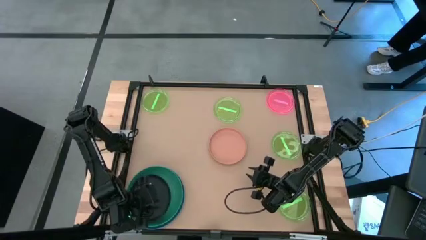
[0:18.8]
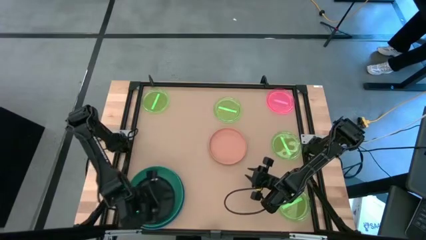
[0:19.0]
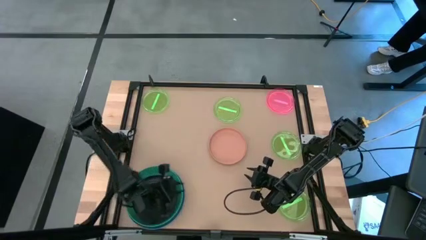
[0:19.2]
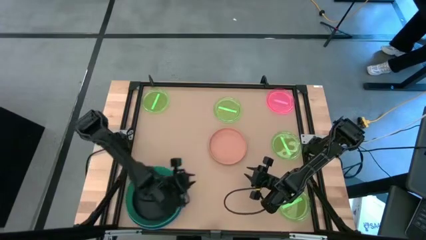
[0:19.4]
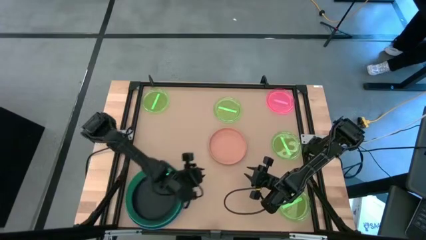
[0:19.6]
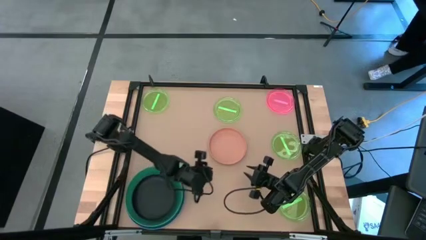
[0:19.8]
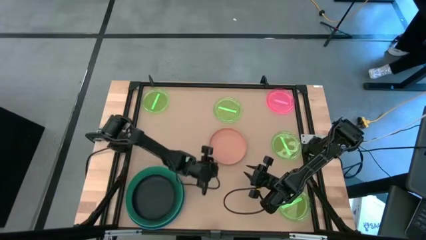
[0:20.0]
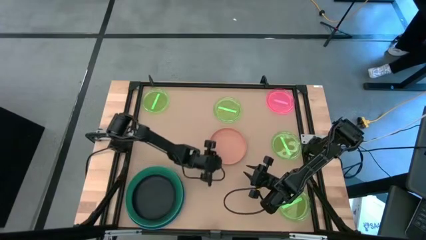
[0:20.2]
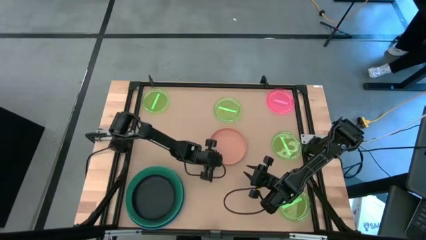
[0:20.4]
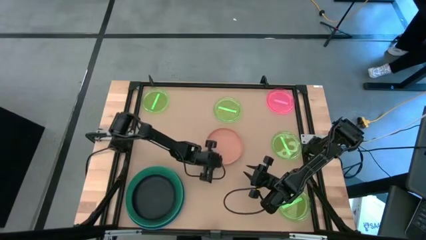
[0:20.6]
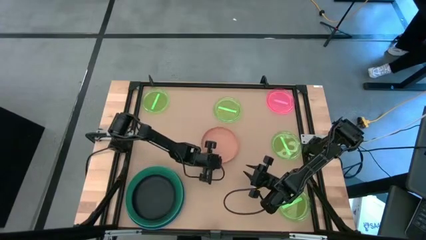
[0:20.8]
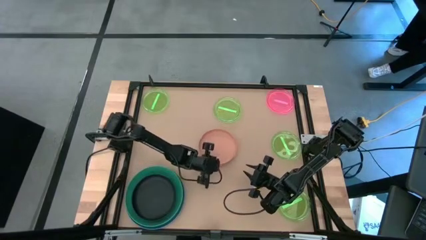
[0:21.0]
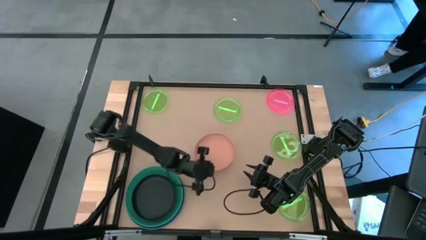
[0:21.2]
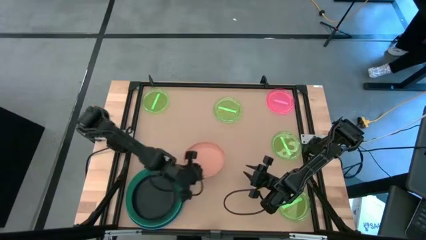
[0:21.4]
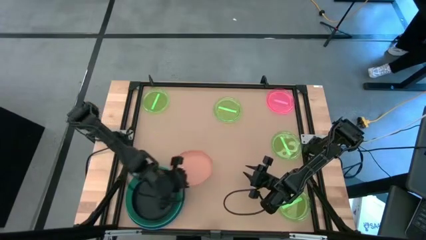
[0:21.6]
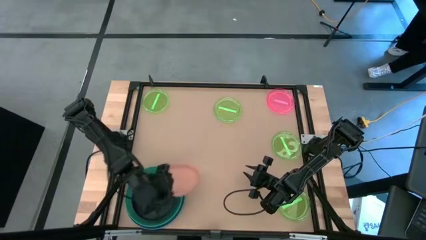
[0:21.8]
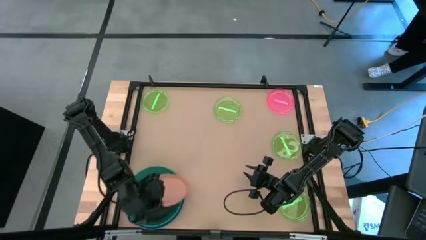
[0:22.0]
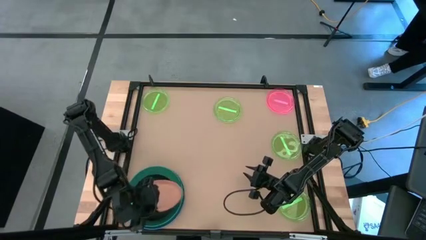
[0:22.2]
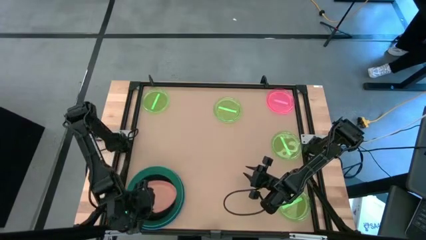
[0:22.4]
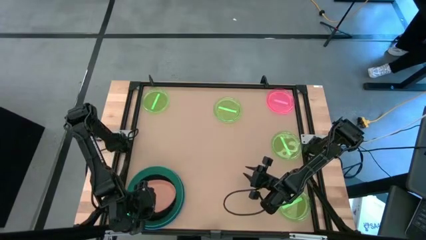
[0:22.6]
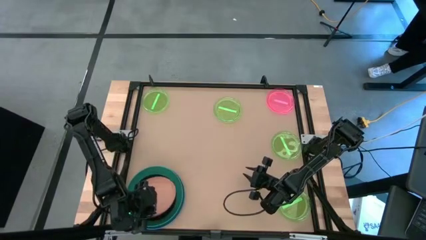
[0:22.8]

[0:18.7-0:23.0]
Task: Stack plastic plates
Stack the orange plate on top of the black plate

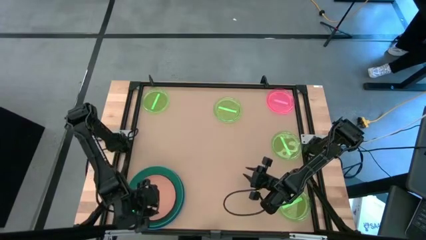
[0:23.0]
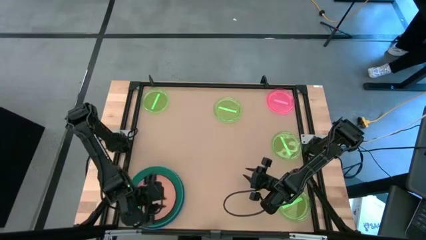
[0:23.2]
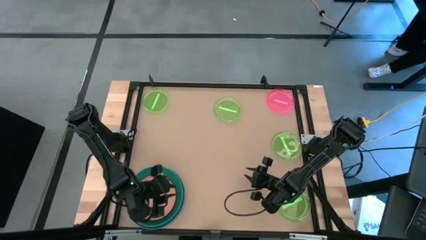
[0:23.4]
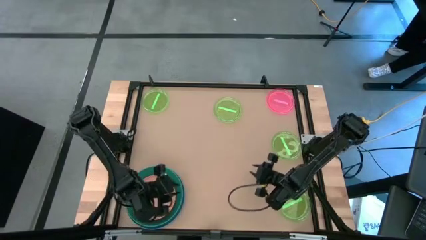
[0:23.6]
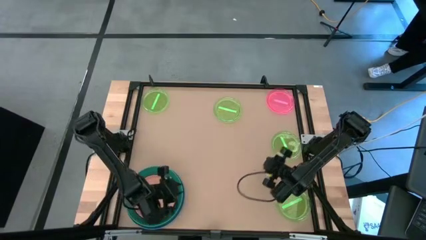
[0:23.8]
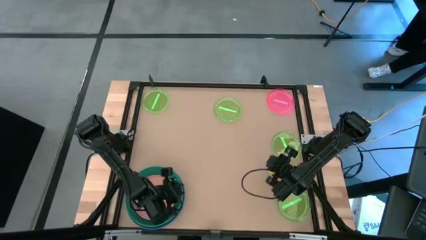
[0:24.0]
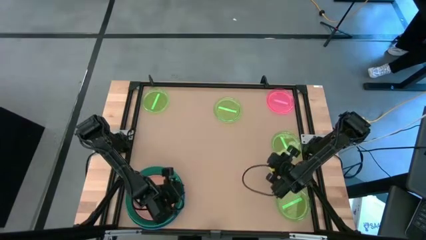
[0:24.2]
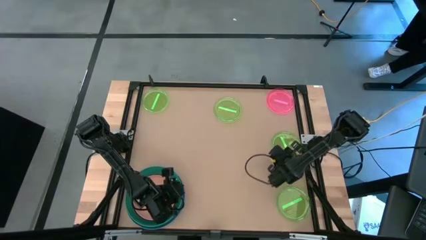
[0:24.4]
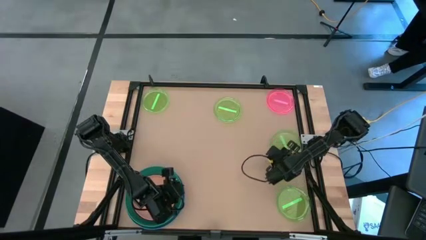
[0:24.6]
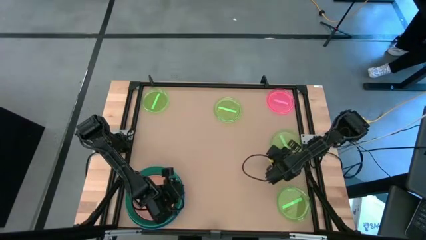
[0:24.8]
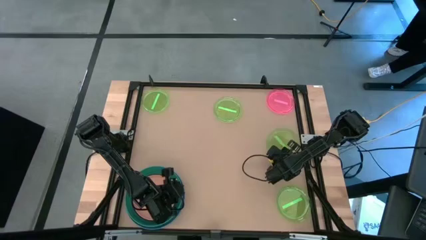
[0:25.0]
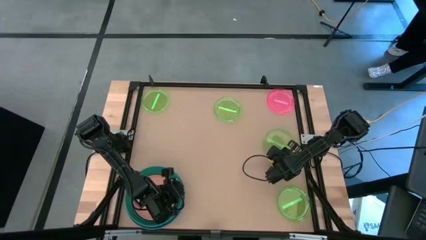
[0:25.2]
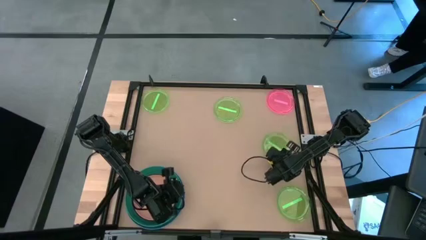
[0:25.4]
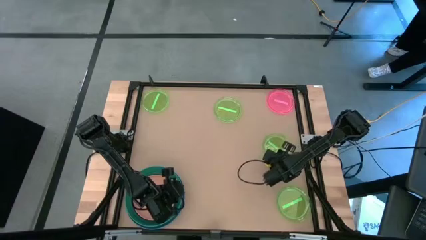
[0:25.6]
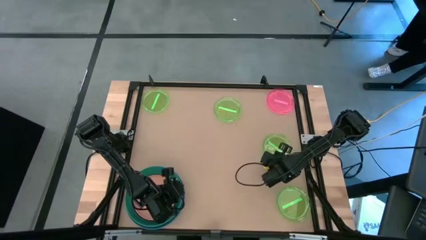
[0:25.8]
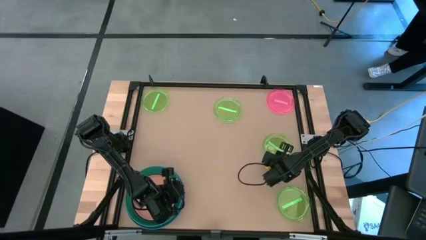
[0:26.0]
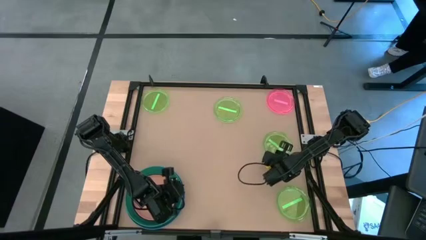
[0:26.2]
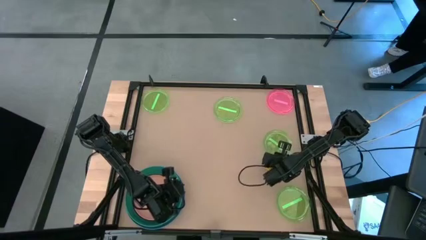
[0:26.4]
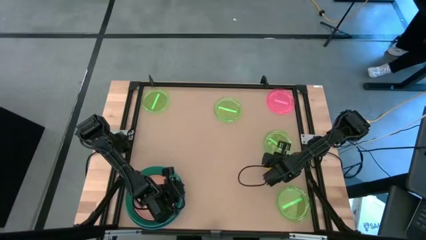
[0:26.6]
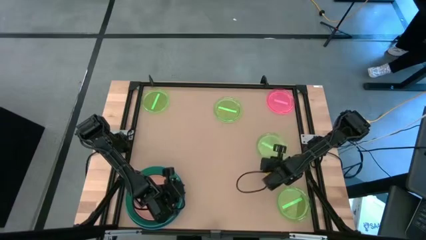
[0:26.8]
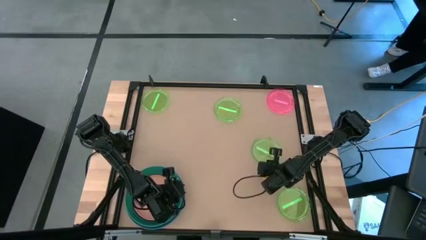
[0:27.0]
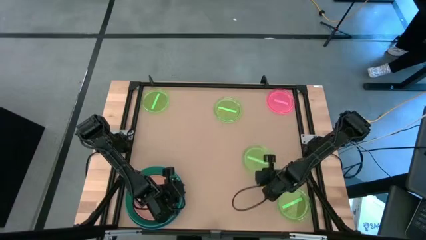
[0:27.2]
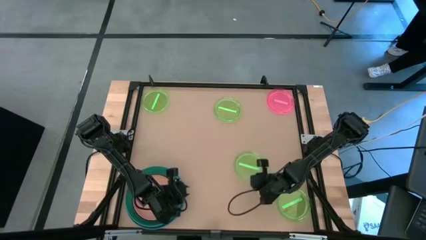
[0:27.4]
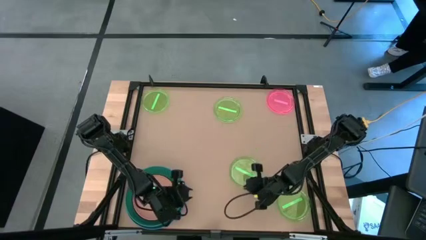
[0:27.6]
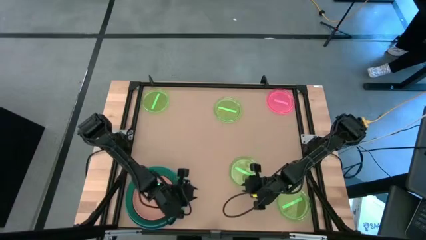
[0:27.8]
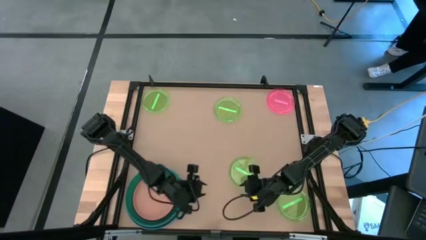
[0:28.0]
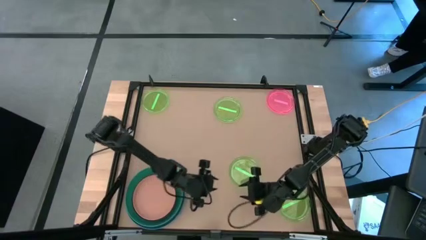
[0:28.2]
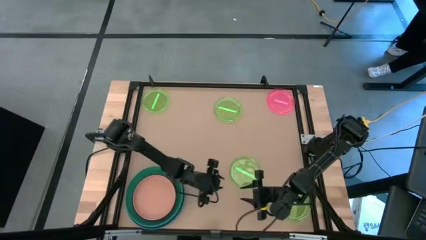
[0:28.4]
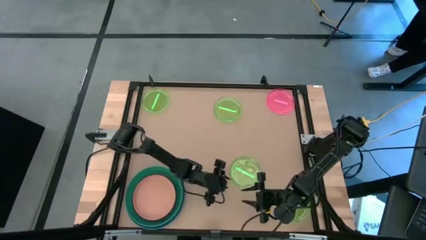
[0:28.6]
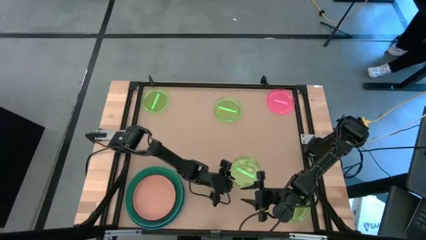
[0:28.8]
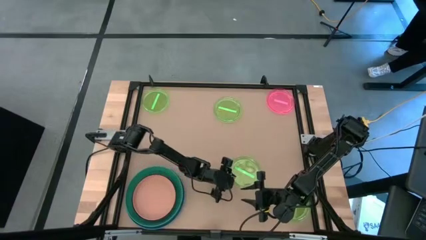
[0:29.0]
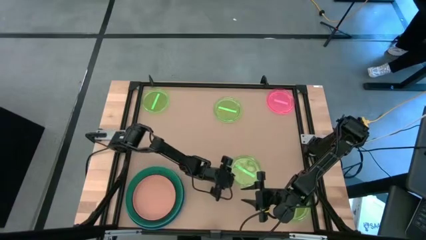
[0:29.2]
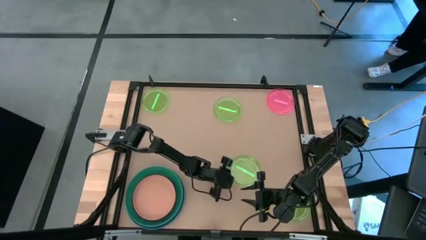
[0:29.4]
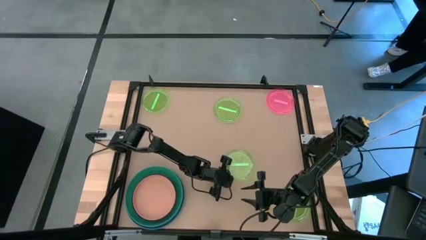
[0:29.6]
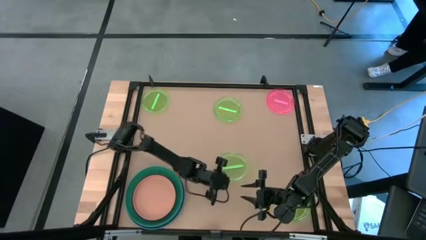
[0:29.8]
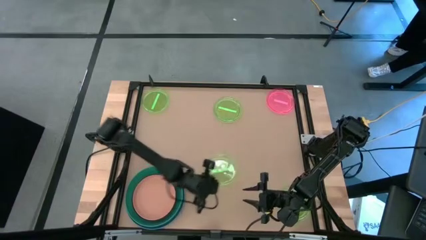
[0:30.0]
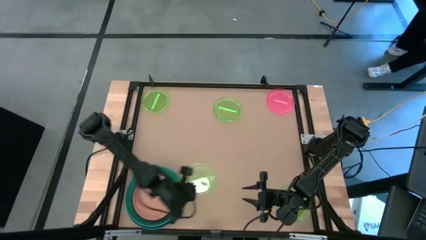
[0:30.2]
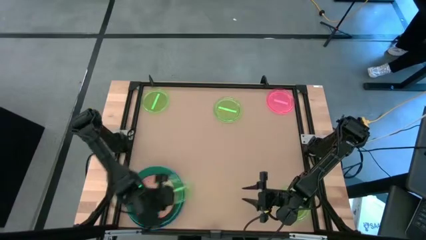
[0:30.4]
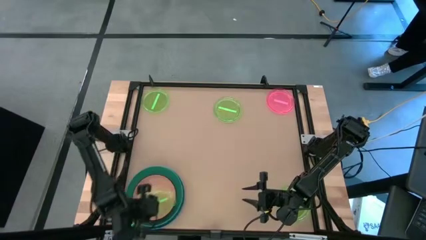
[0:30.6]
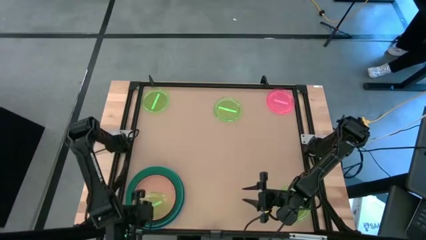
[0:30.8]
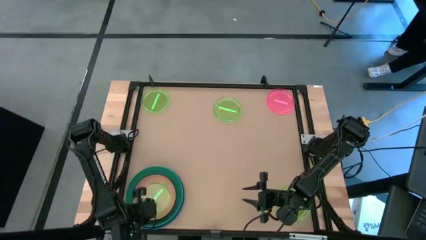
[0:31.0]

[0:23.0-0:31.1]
Stack the light green plate on top of the orange plate

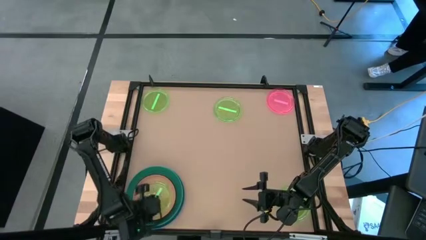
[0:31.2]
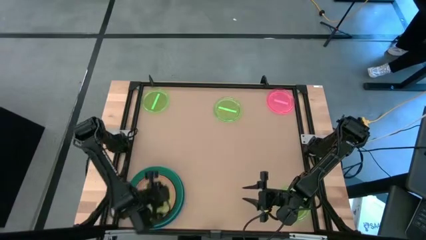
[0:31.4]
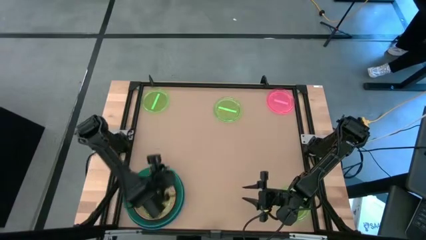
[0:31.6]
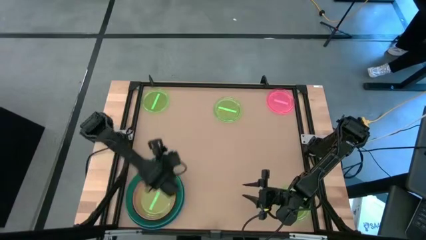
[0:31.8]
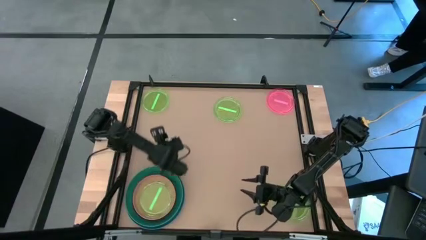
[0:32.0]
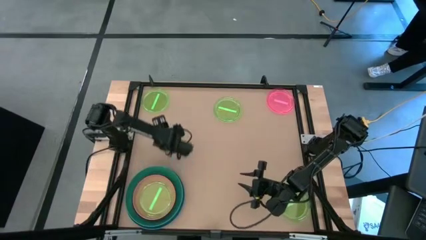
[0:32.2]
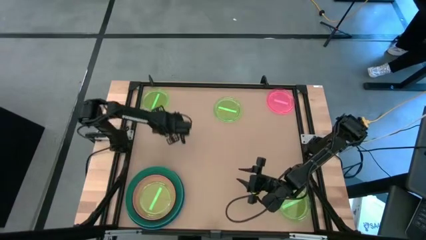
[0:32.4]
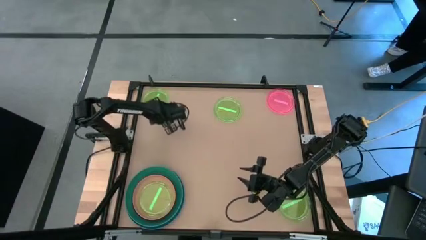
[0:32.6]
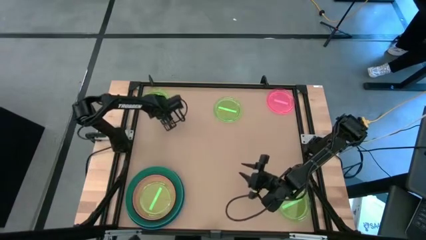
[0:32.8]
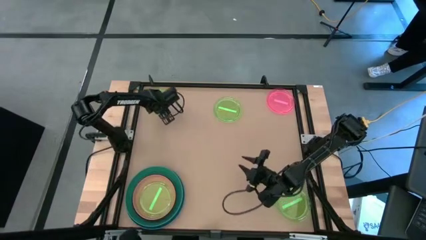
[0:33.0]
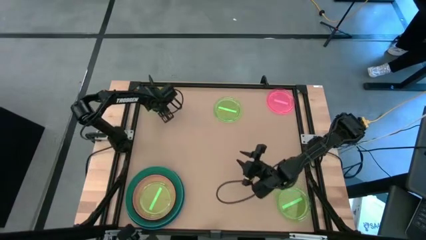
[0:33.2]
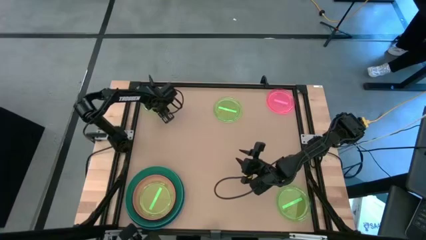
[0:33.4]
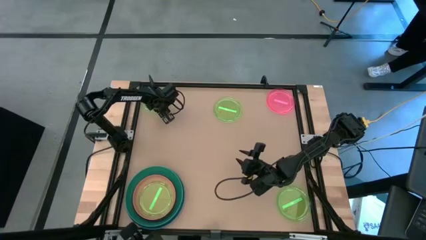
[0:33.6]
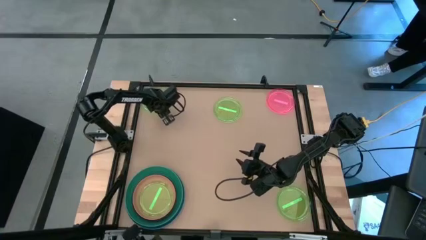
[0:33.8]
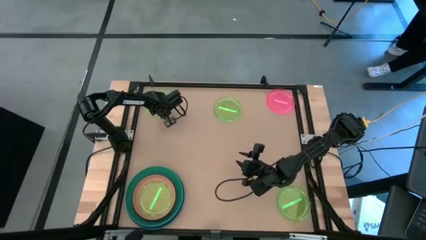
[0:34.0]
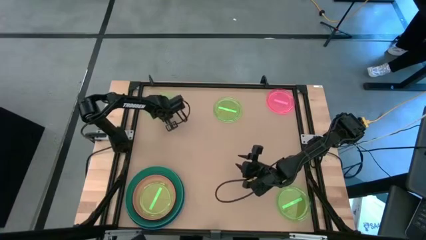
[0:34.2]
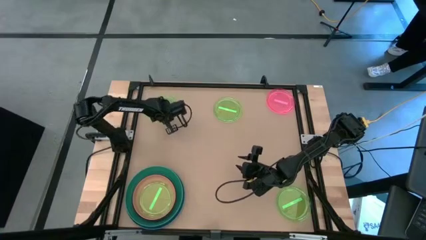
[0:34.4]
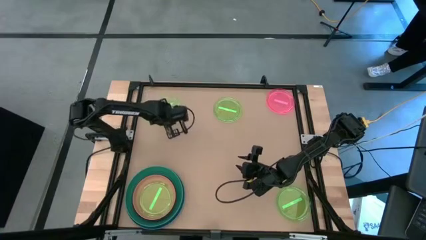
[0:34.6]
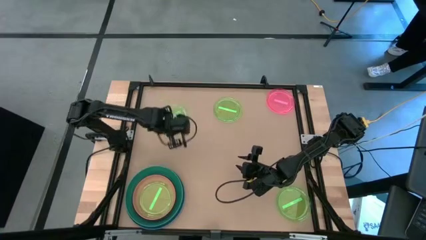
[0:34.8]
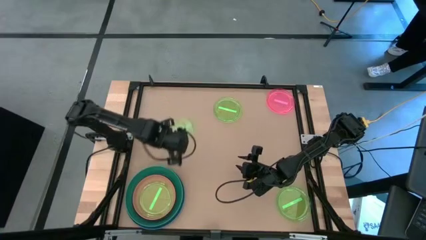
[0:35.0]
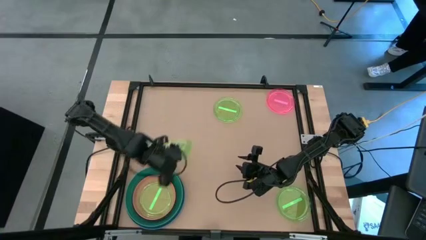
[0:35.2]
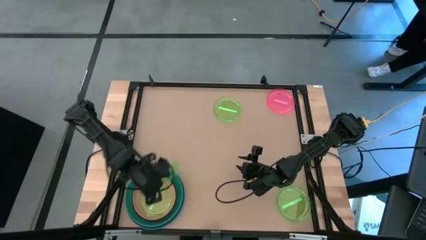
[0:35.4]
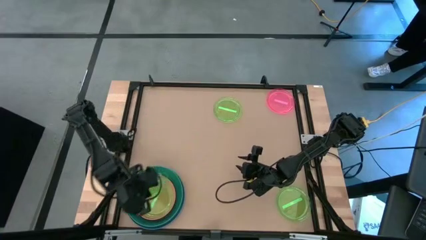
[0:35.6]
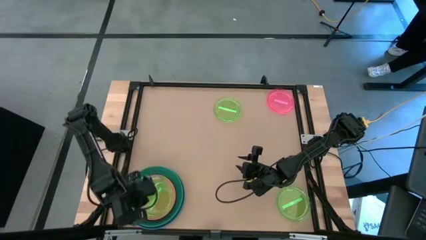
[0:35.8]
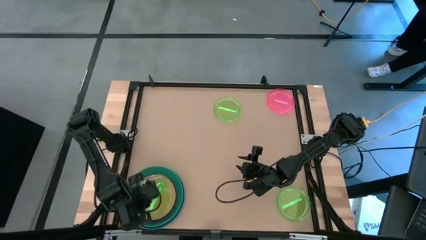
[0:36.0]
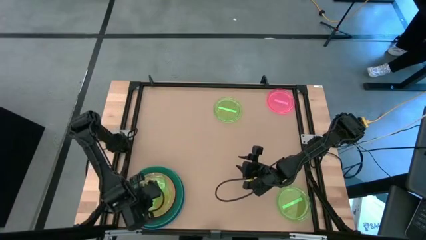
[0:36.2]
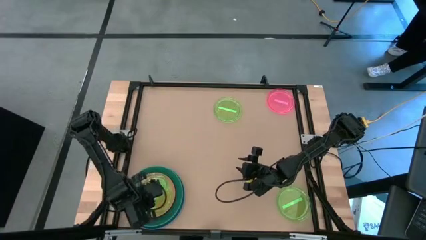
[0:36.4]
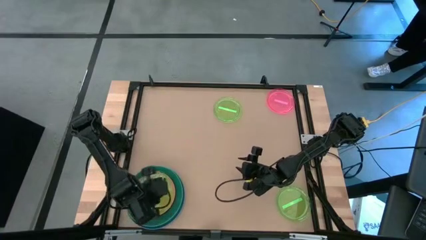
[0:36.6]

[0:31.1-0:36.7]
Stack the light green plate on top of the light green plate
